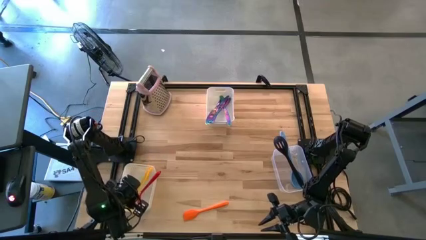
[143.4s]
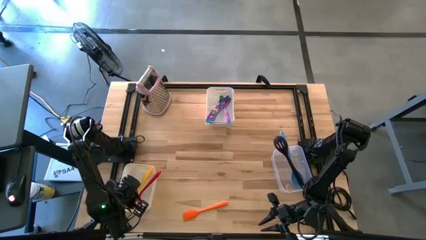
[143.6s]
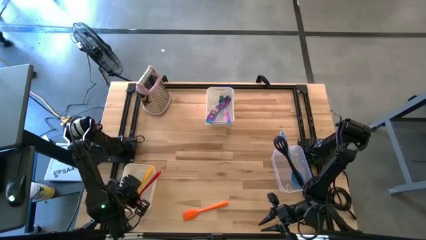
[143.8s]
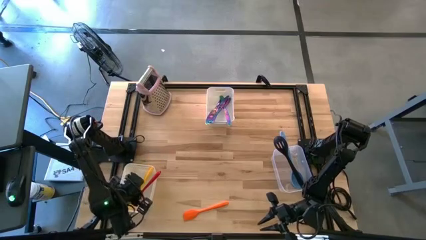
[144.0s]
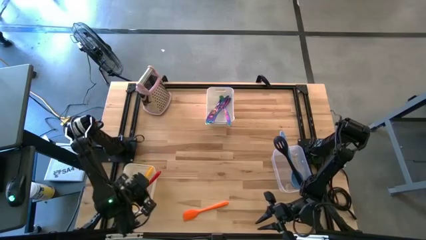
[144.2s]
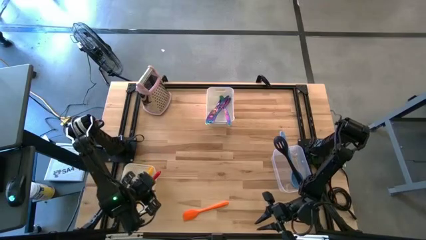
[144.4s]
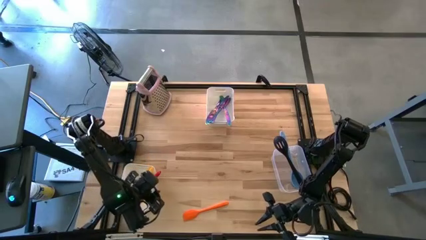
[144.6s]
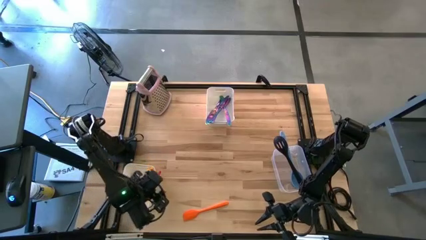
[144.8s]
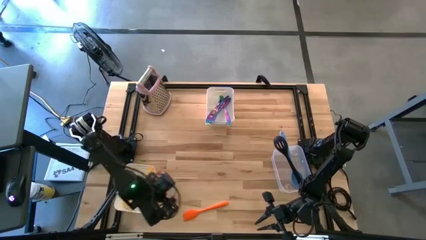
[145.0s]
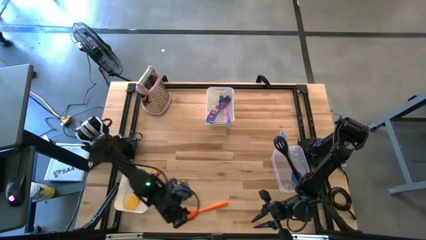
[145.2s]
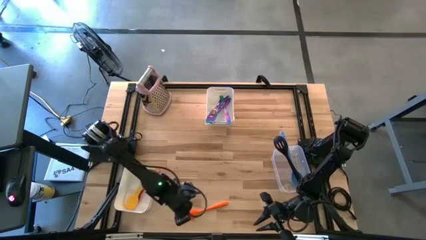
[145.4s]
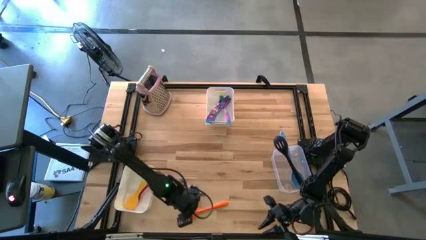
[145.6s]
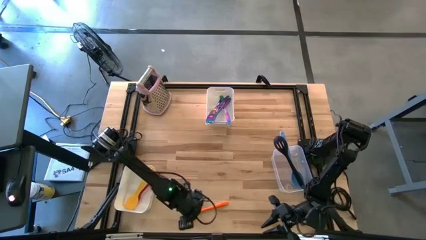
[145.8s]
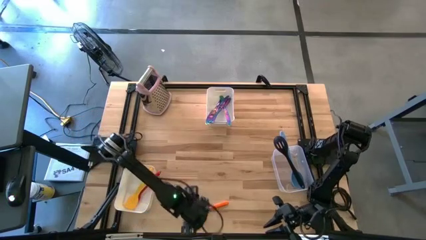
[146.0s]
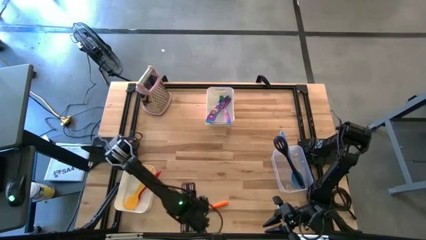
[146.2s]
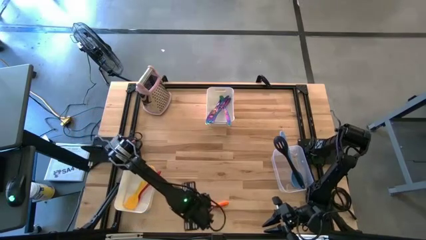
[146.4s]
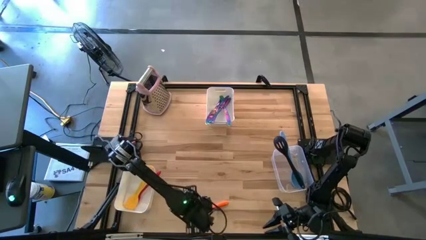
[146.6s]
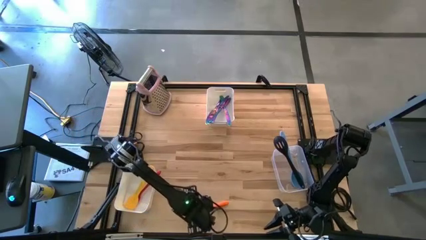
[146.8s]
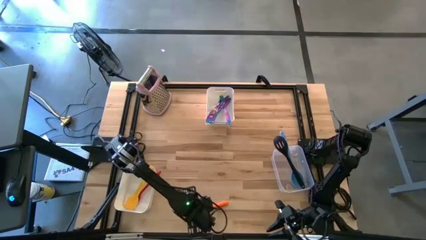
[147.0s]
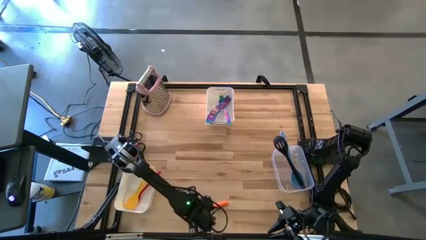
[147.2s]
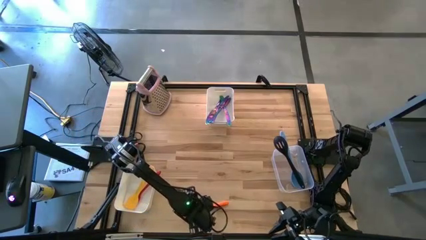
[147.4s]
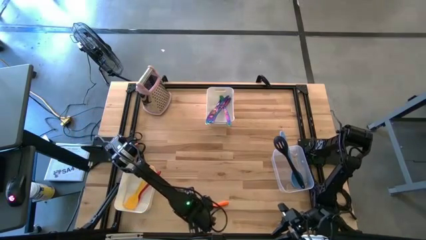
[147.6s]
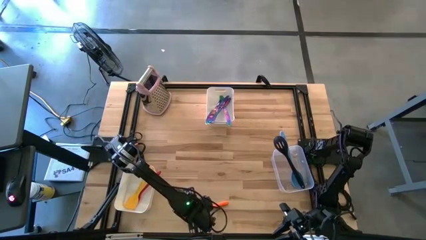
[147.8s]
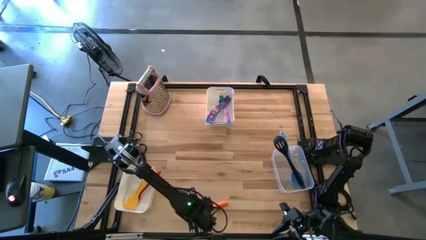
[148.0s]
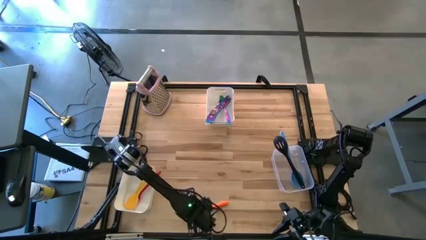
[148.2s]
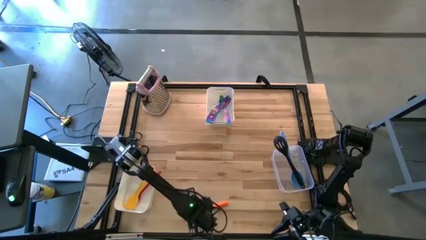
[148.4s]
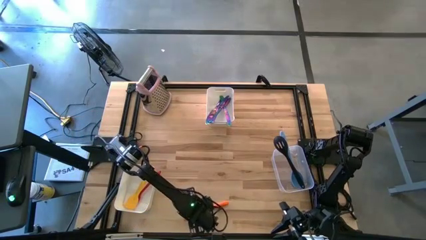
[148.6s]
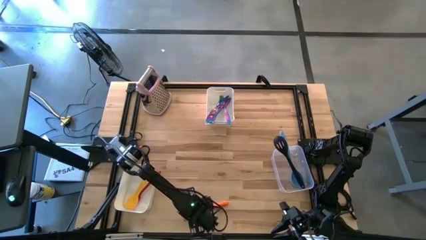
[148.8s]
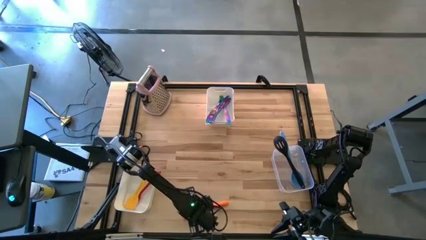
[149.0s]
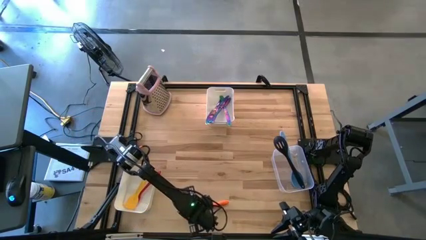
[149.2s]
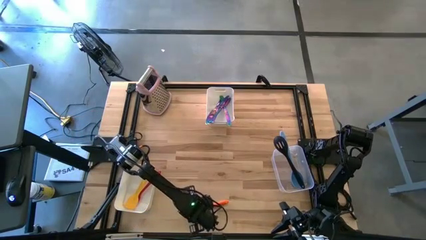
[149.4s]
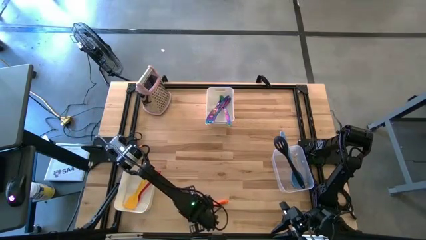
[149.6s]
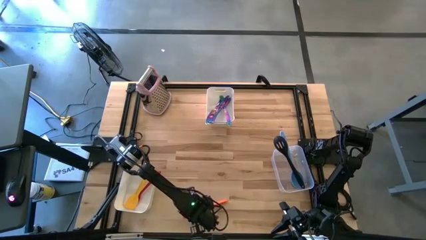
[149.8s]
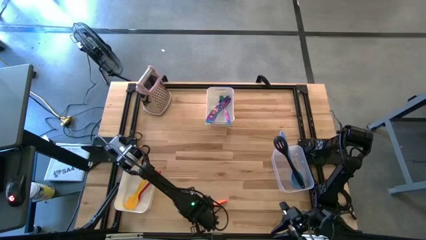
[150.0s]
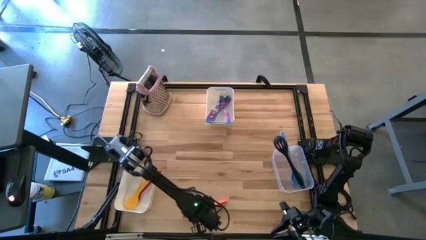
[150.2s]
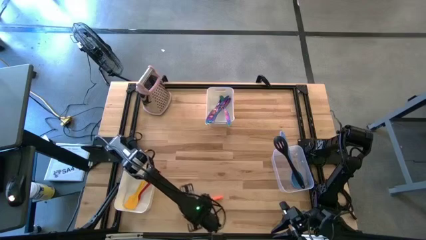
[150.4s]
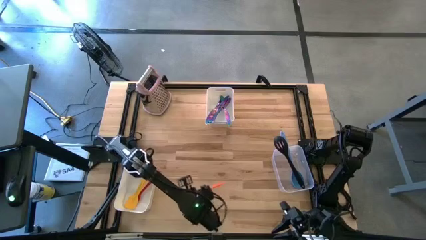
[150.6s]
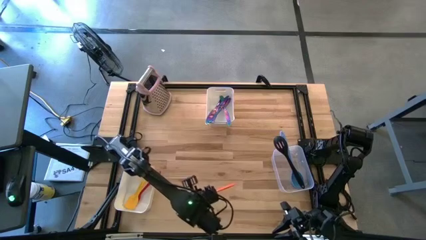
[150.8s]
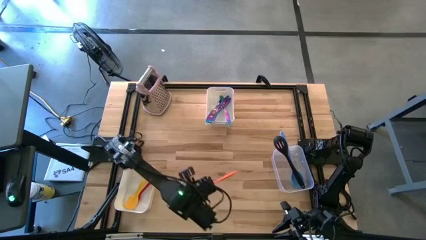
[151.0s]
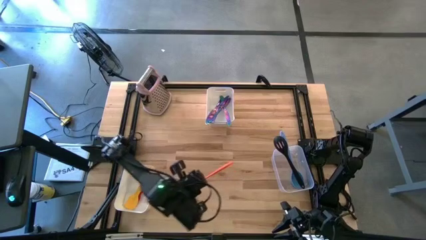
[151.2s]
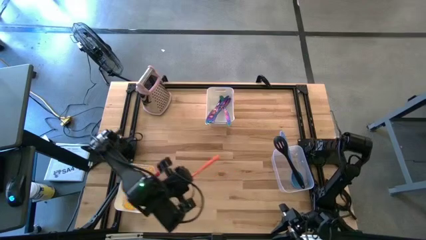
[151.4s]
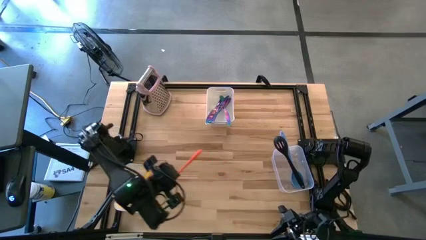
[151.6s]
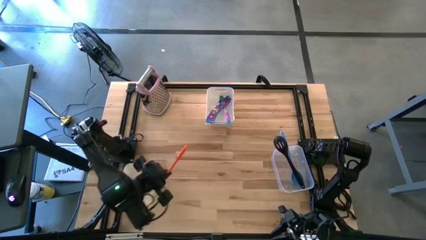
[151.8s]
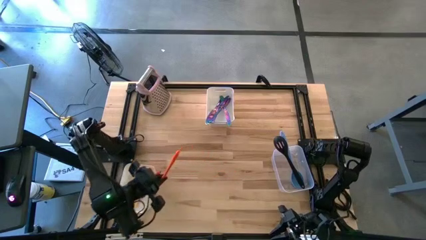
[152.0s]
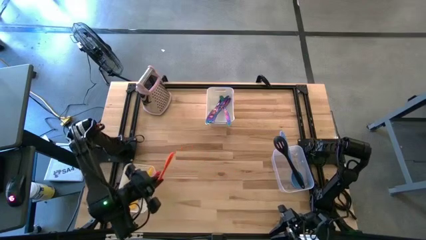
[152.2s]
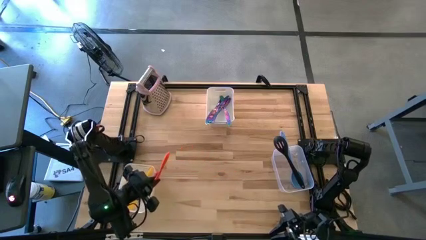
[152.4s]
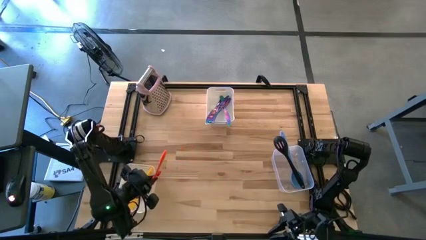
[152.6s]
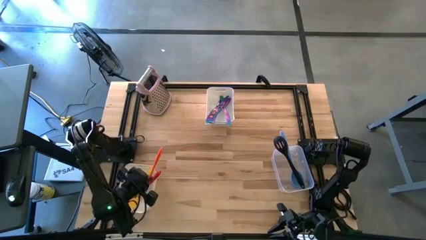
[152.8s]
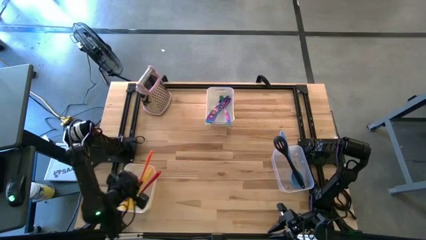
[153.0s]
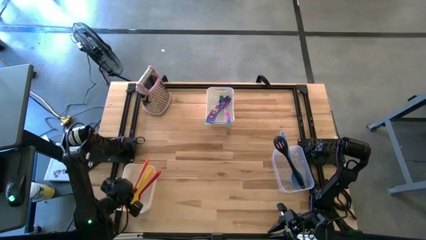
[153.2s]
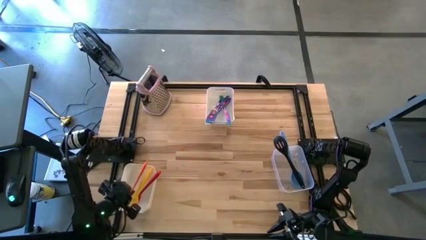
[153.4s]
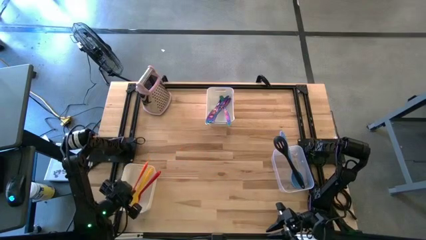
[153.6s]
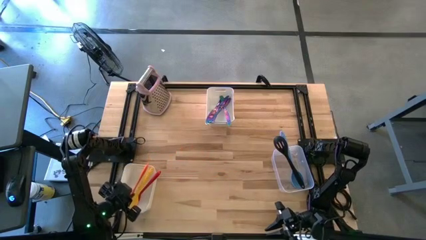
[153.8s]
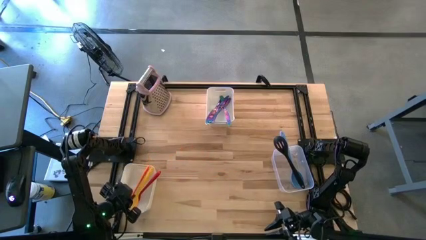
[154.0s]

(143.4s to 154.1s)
Task: Pick & Place Kitchen Items
Put the orange spatula into the left white bin
